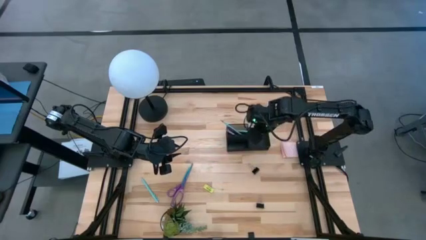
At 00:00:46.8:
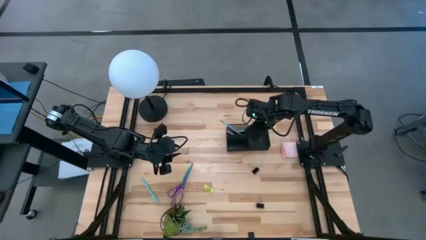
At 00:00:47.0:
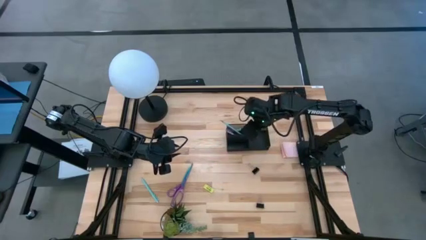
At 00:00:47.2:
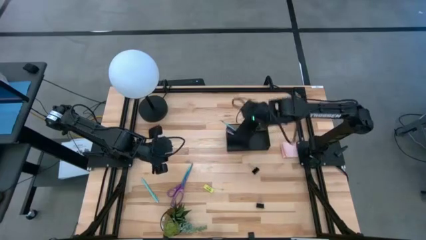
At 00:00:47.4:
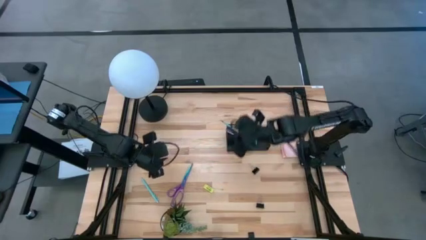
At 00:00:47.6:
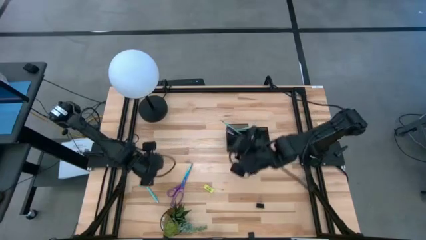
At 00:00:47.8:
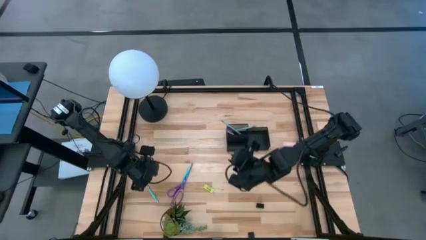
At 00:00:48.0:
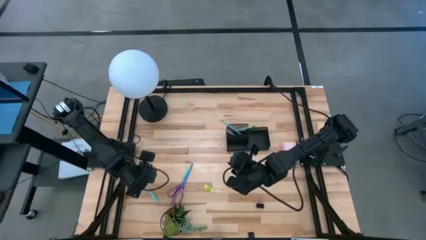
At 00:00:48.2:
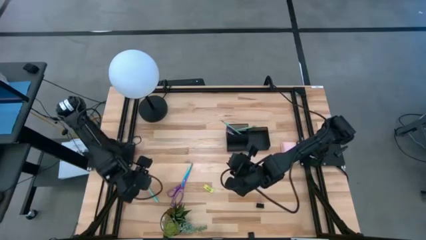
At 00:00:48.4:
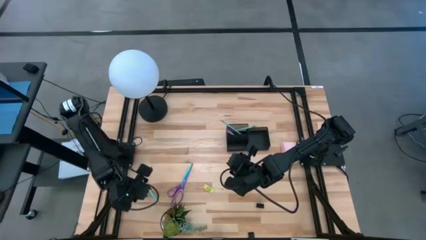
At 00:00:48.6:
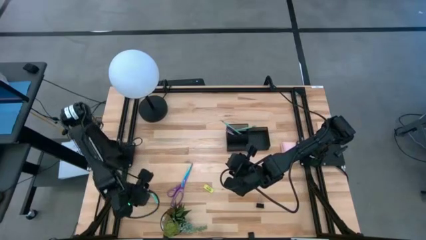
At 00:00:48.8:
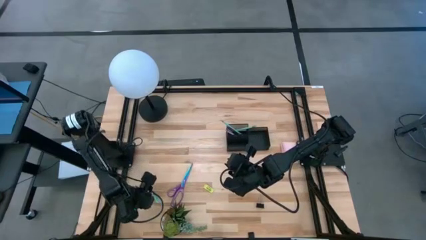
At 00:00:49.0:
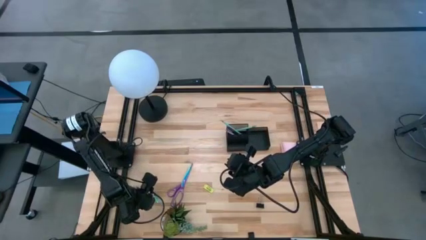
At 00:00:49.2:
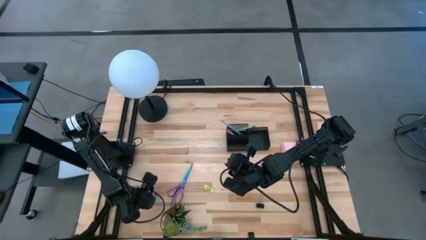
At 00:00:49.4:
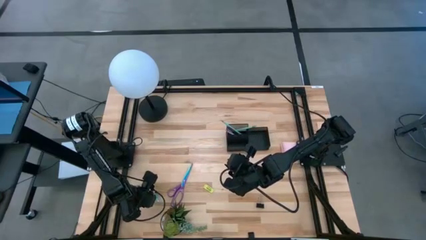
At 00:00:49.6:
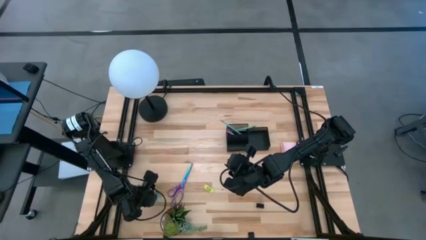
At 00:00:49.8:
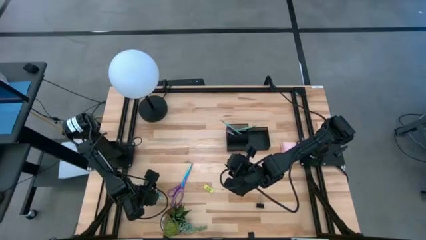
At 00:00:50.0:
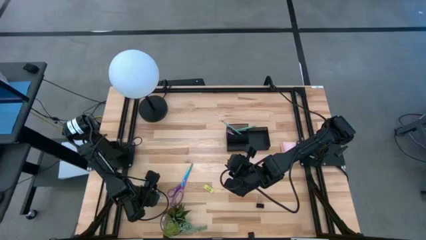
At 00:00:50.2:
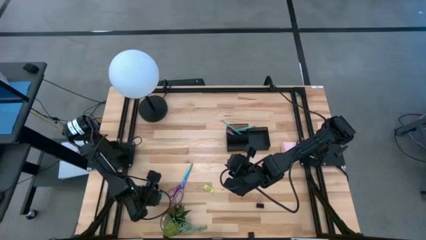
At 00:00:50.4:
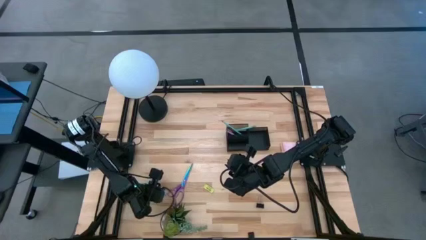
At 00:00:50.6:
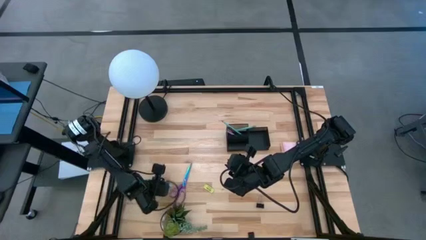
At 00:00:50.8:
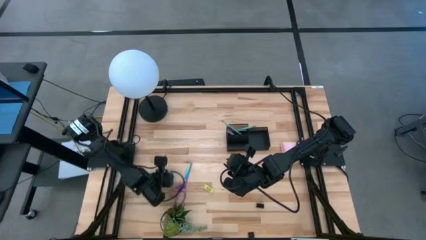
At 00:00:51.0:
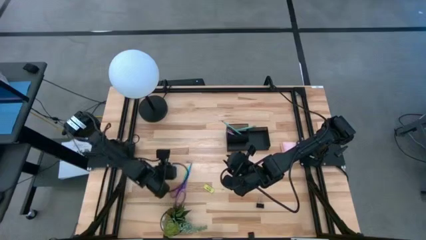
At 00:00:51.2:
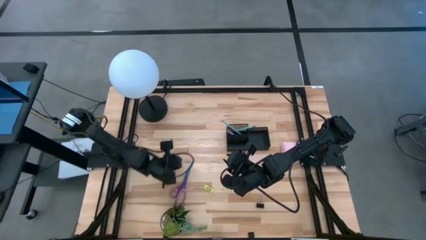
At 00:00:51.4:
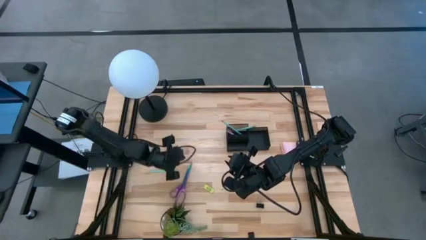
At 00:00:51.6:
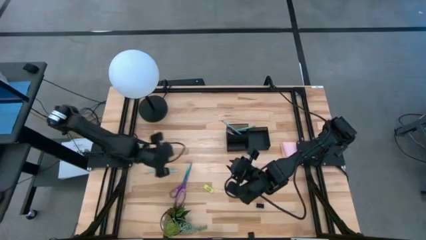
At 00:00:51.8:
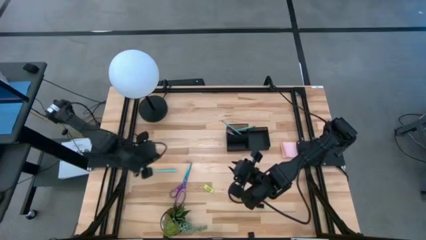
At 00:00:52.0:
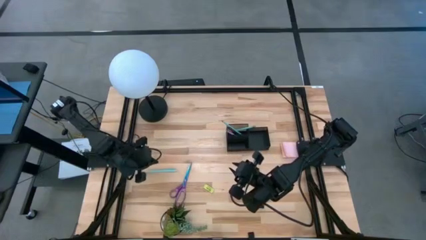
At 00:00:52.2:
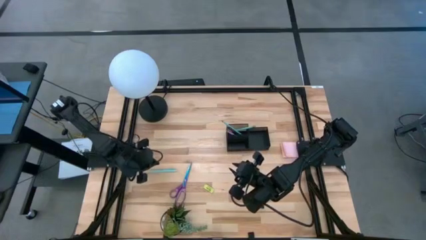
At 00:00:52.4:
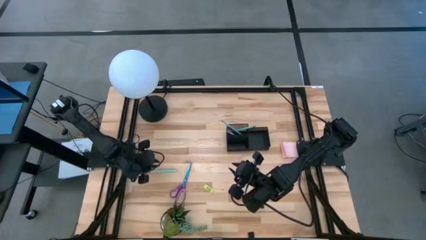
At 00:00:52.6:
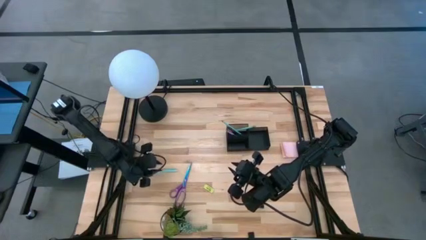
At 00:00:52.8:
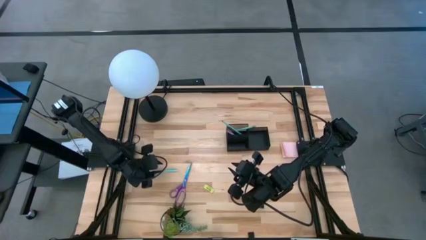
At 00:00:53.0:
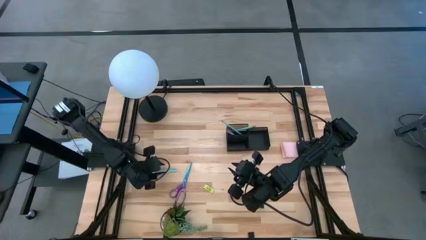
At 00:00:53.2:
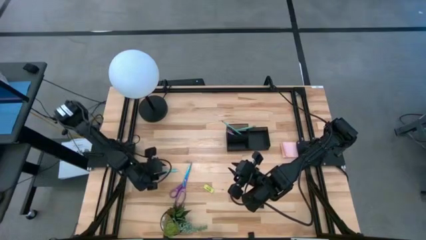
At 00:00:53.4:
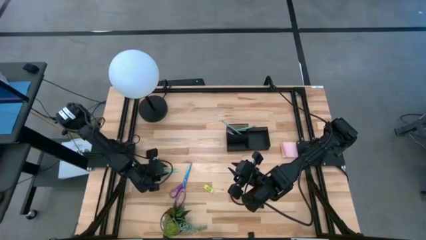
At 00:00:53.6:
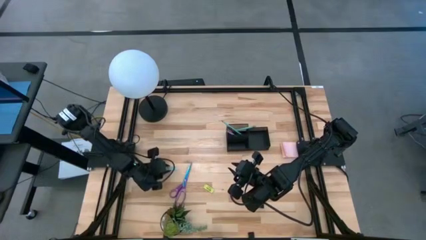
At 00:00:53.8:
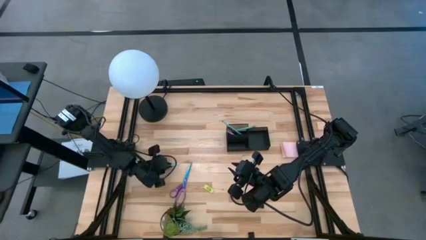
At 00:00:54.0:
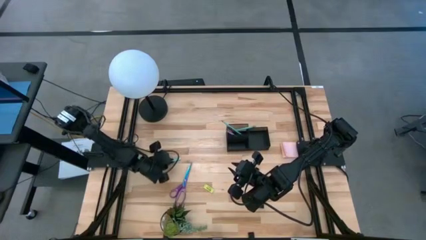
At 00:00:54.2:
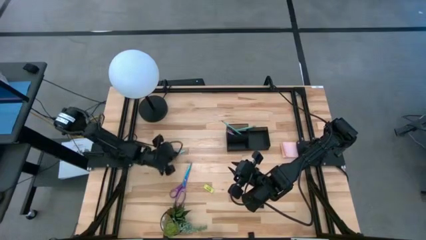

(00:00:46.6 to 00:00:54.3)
Task: Pick and place office supplies into organizer
Put the blue pen into the black desk organizer
